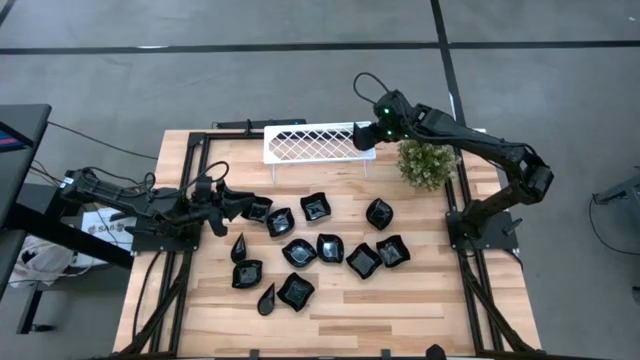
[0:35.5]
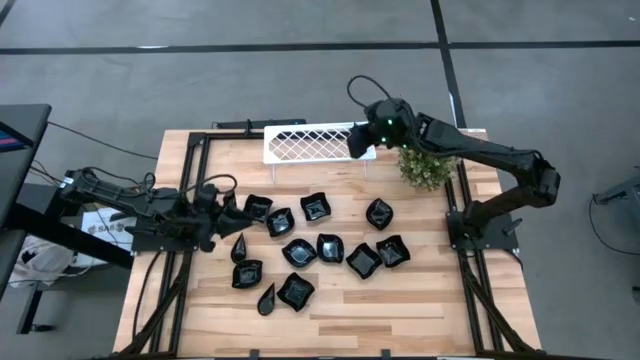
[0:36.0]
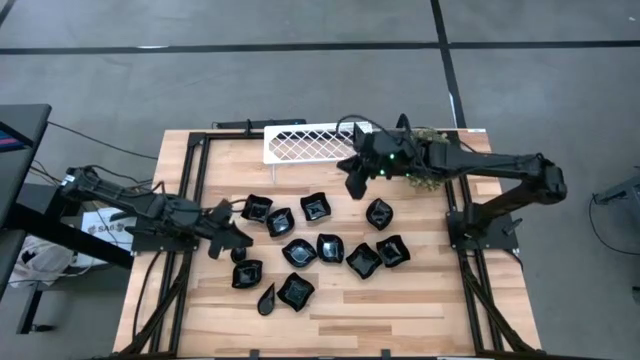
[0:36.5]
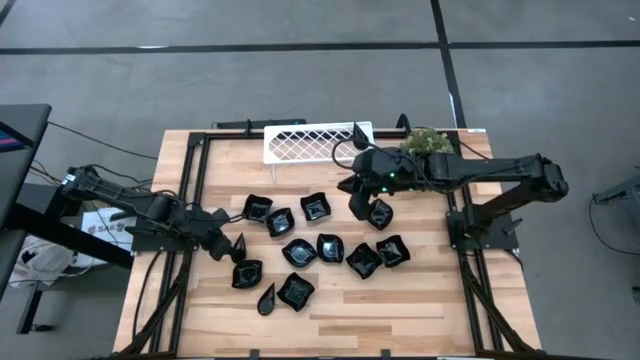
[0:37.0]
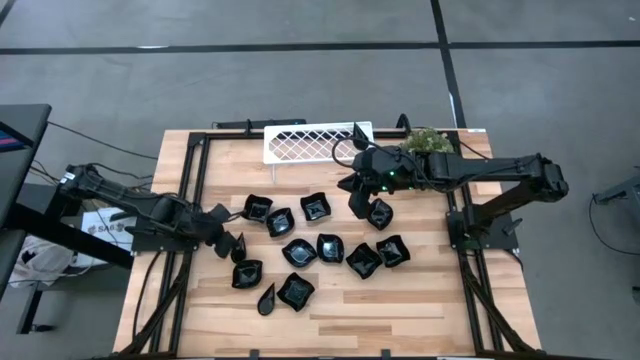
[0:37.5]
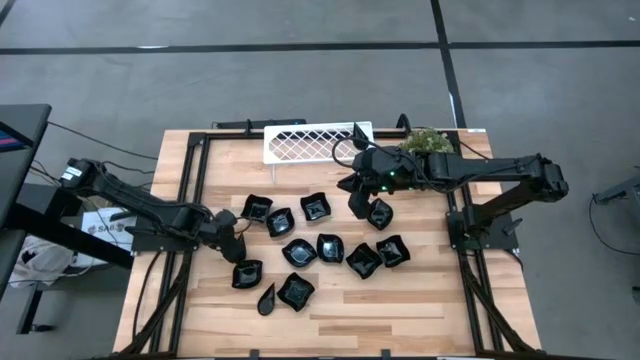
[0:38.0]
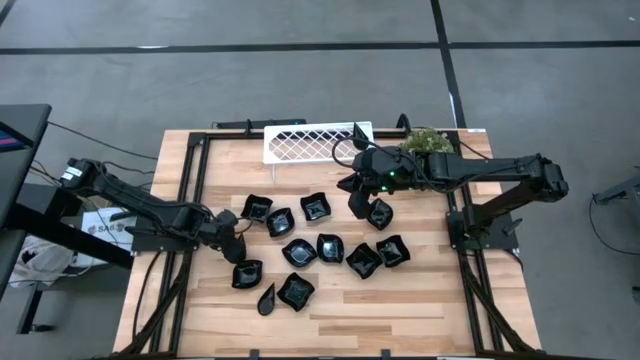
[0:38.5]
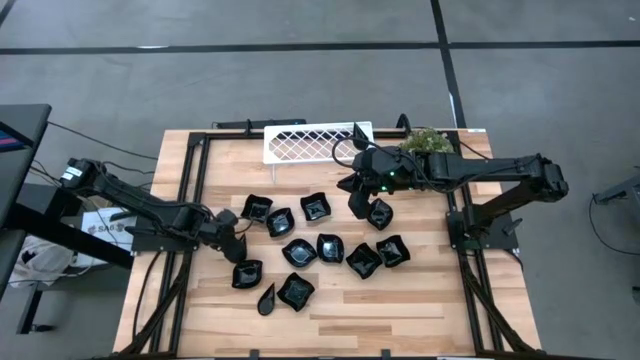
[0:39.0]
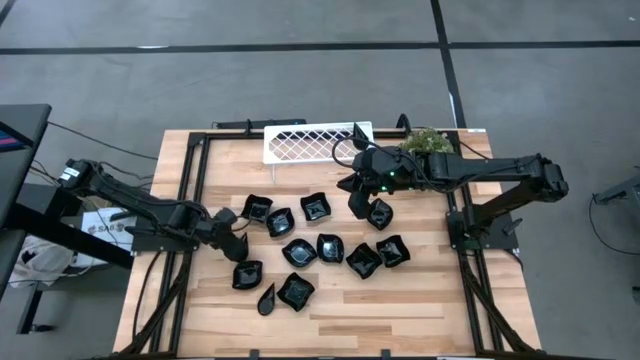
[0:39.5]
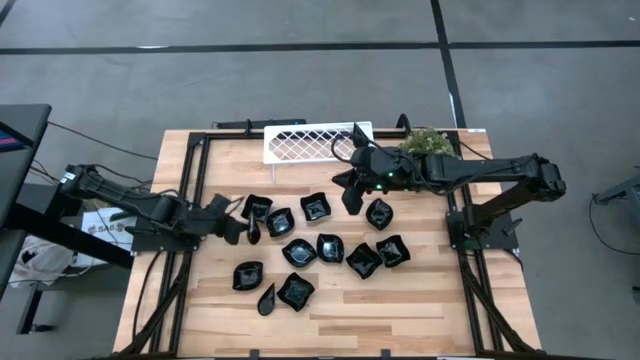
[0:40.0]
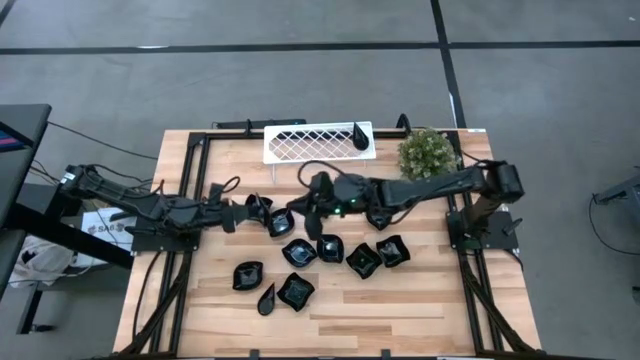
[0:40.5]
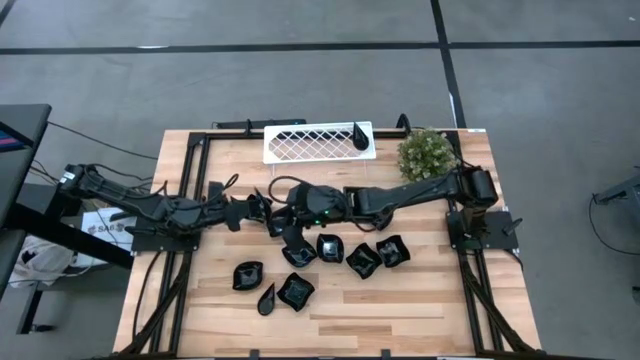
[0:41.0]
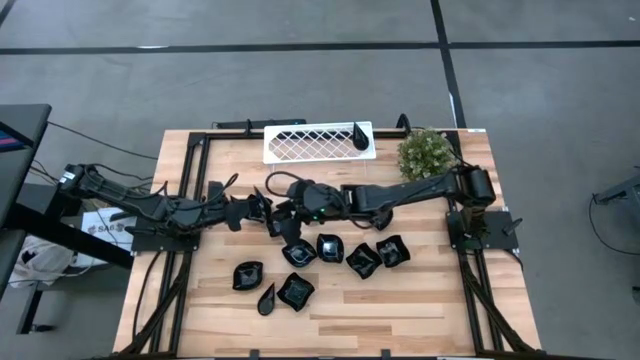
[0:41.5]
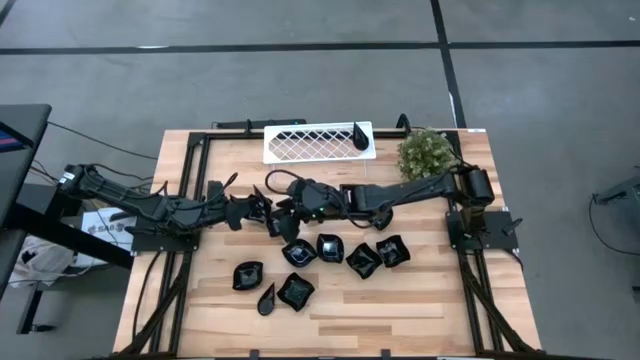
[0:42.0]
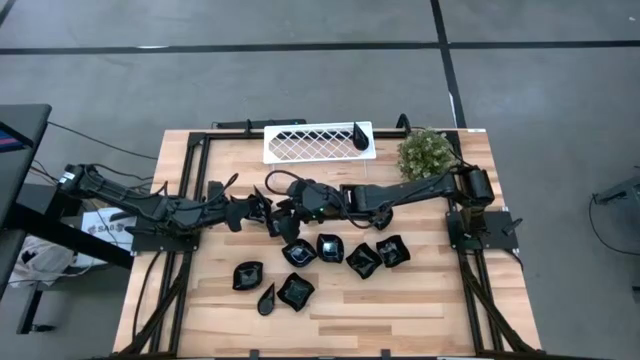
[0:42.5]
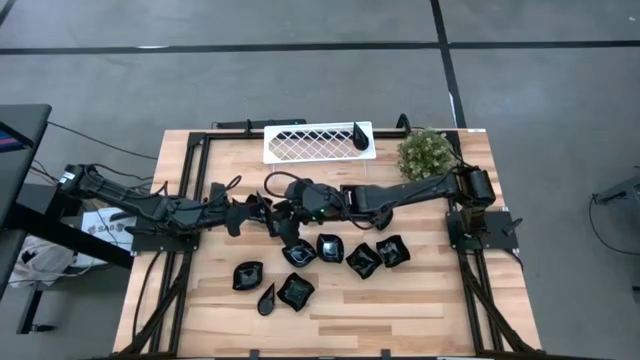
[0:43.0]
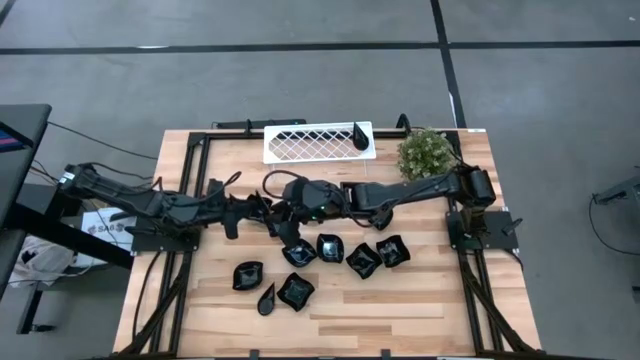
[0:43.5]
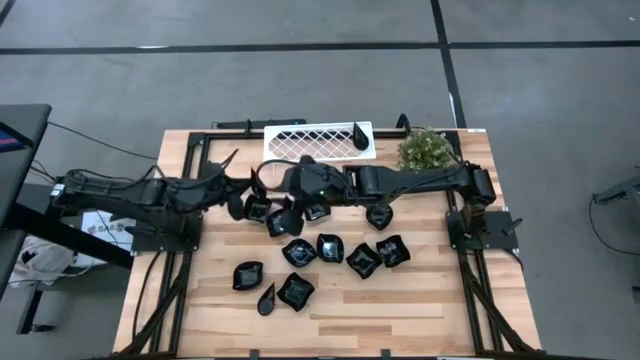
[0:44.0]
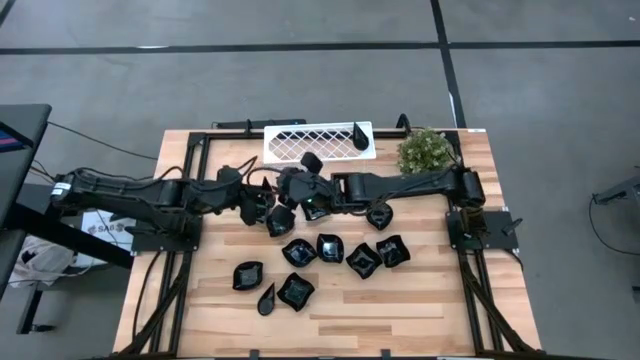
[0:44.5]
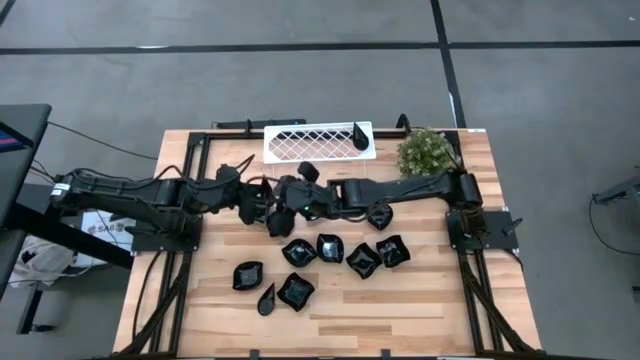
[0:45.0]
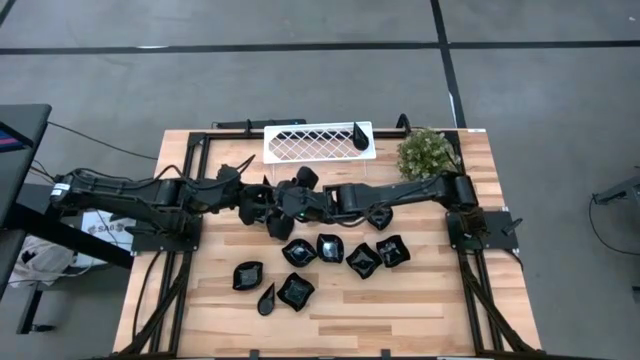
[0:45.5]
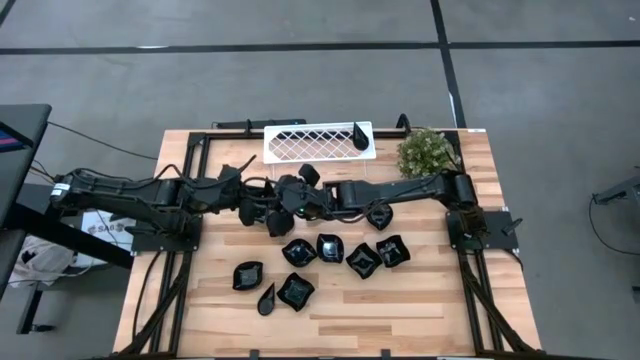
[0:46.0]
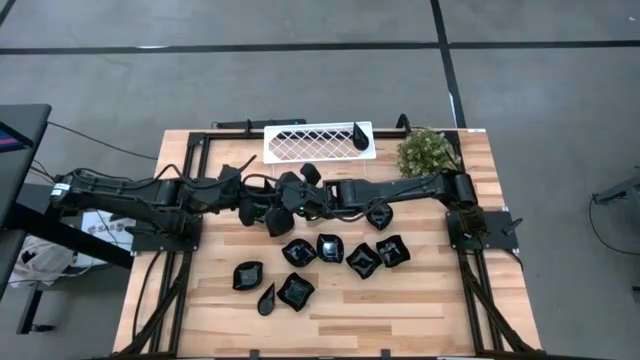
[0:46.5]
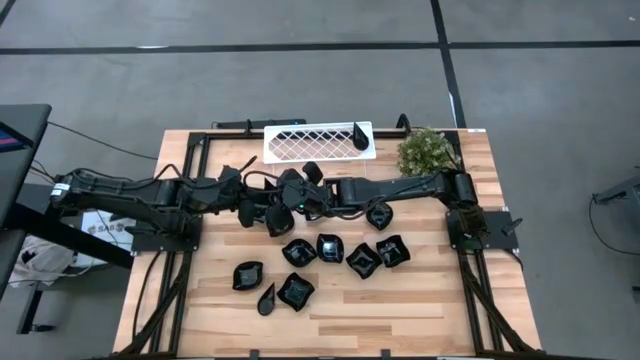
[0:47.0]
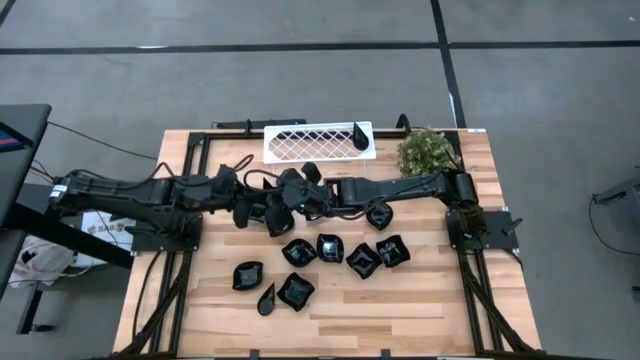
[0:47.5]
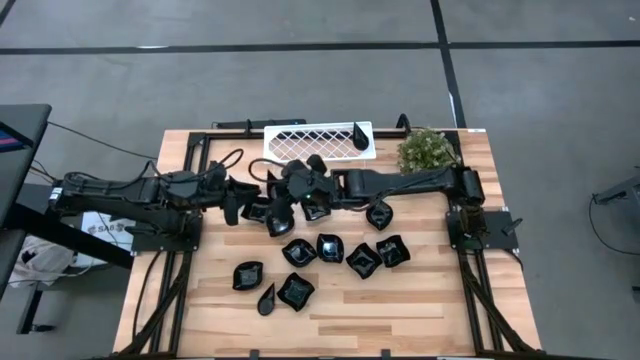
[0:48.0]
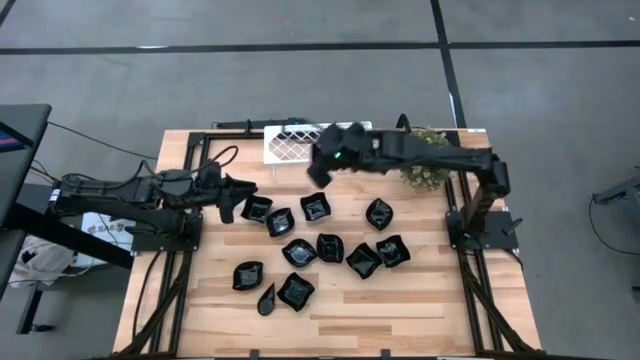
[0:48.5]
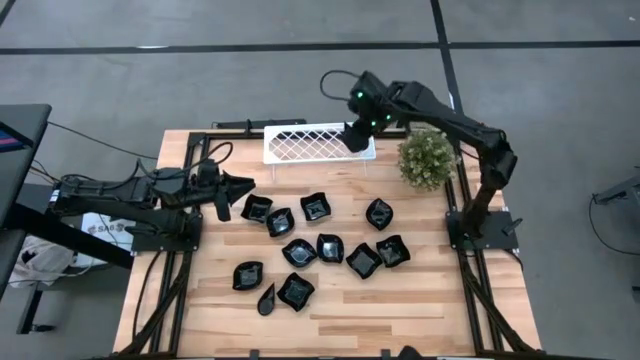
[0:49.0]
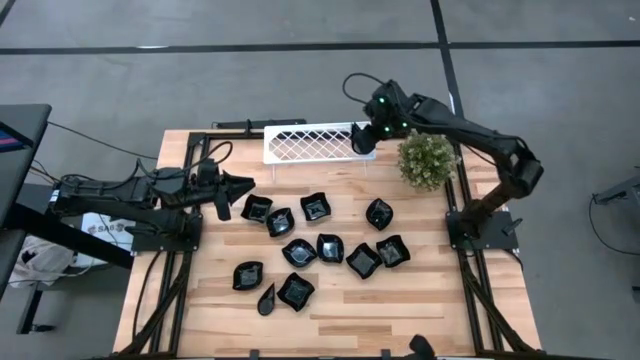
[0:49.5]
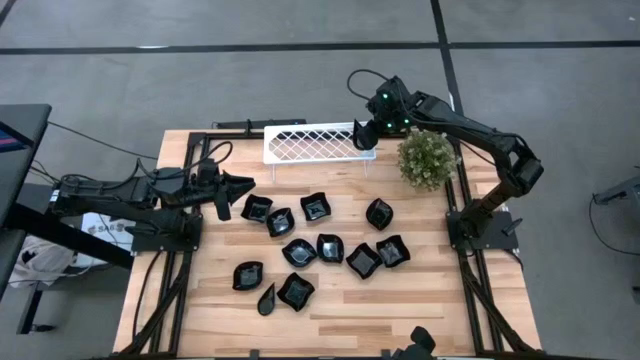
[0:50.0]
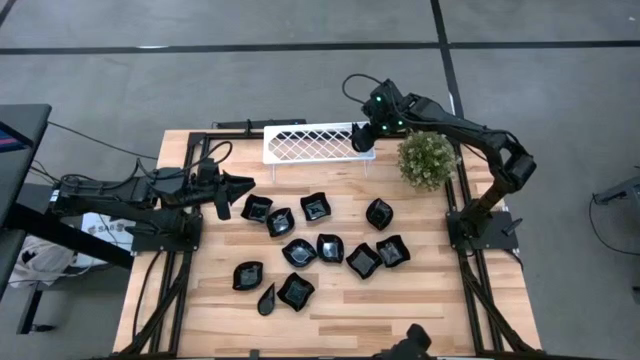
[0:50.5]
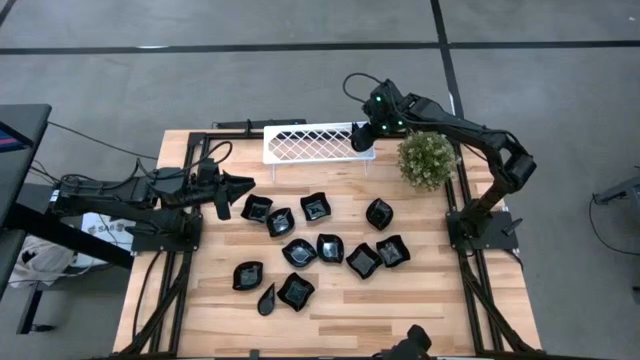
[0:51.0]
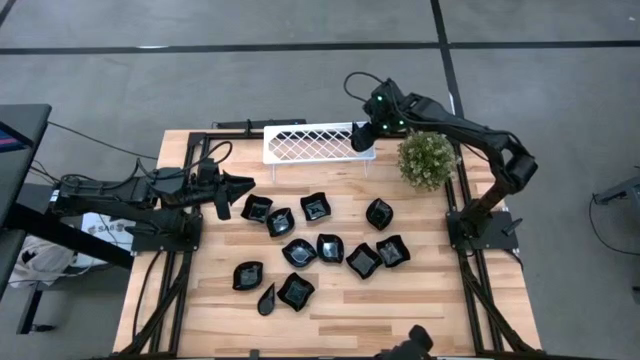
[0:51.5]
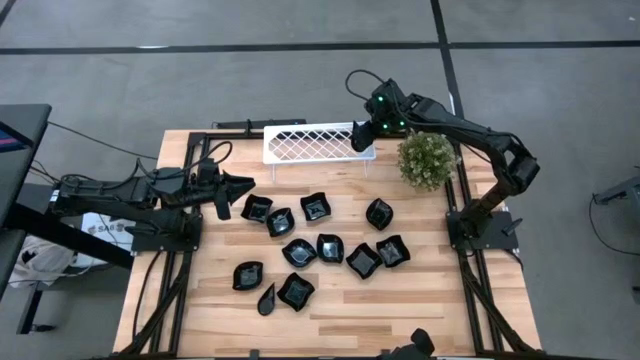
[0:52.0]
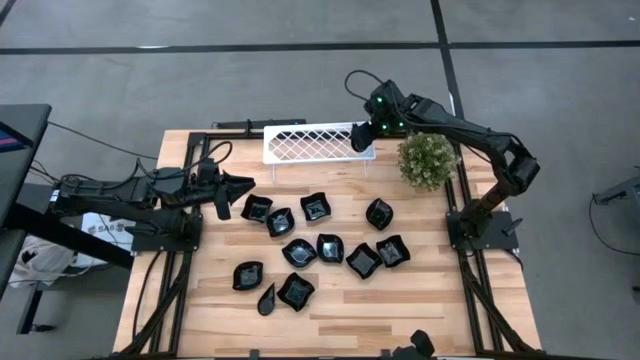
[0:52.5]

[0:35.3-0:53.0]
Task: Pick & Place Mini shaped plates
Stack the black drop shaped plate on top of the black drop shaped plate on the shelf

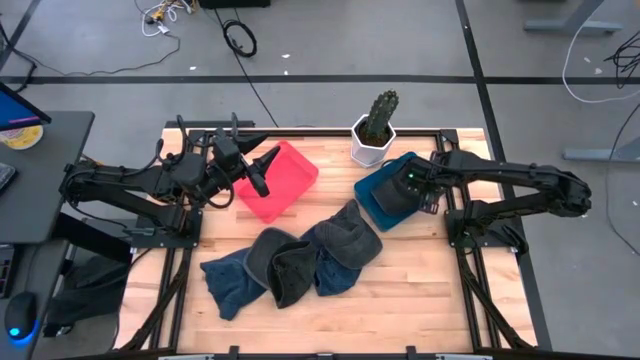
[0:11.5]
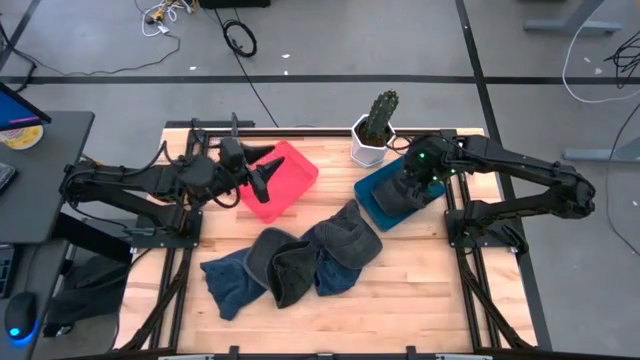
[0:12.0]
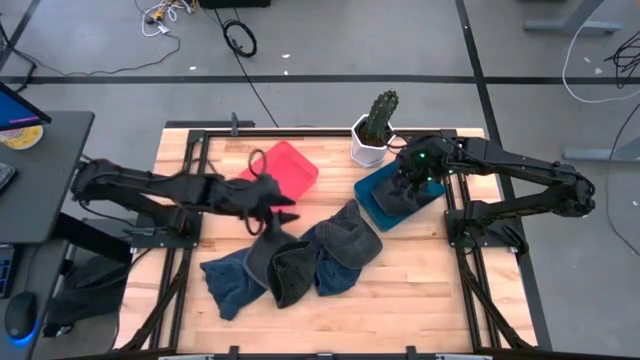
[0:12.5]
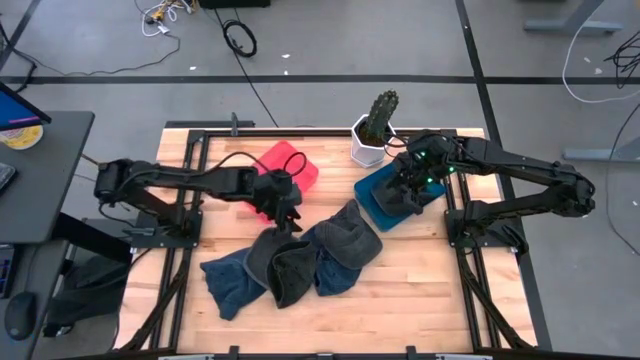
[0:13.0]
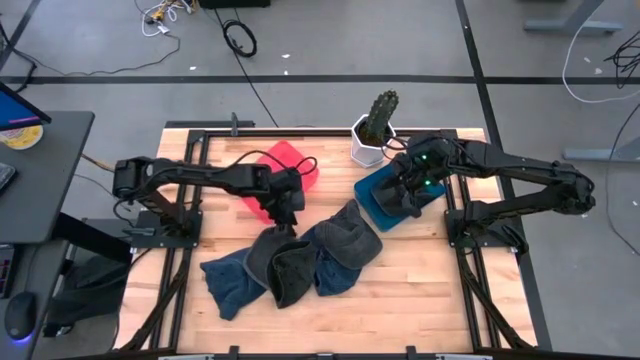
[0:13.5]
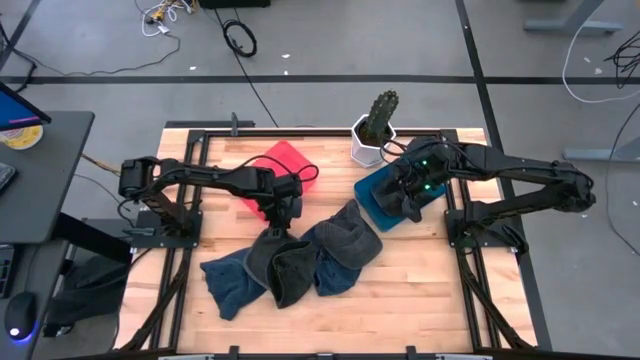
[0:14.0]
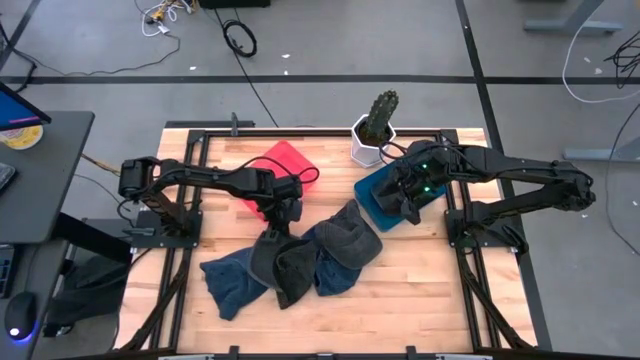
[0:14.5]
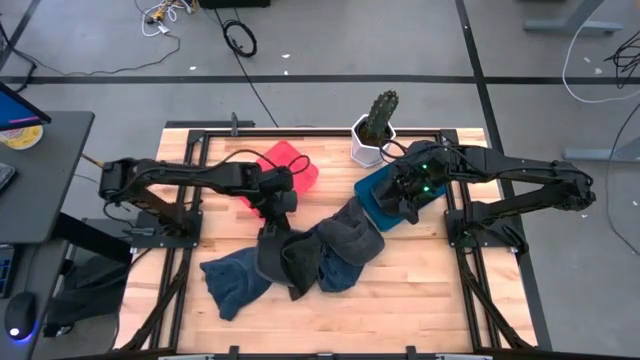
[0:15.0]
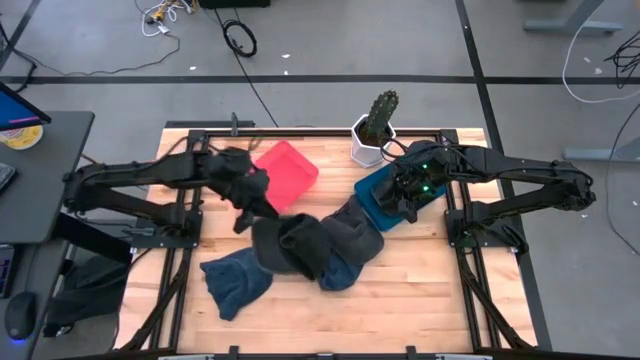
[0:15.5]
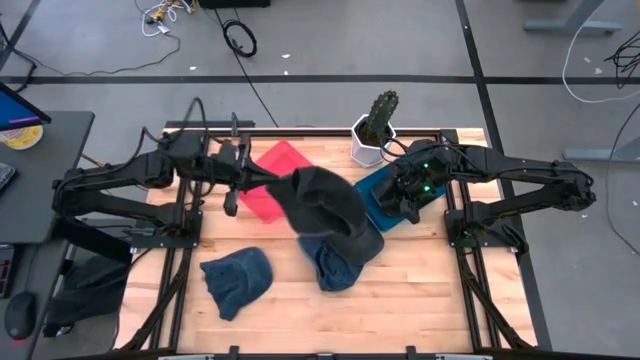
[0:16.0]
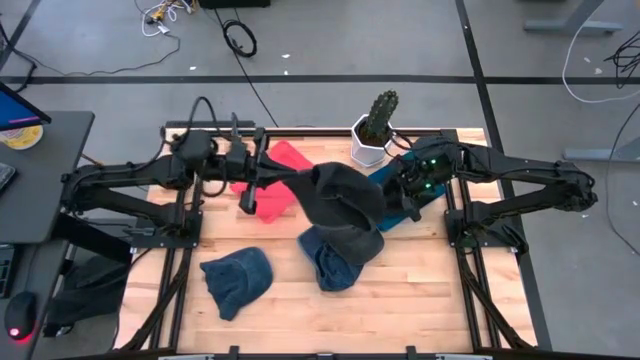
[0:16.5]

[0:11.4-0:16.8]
Task: Pick & Place hat
Put the left black cap into the blue bin
